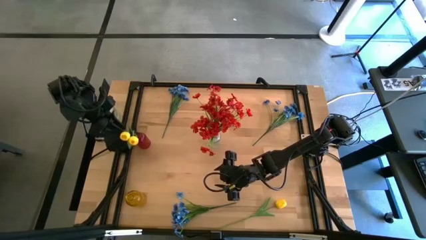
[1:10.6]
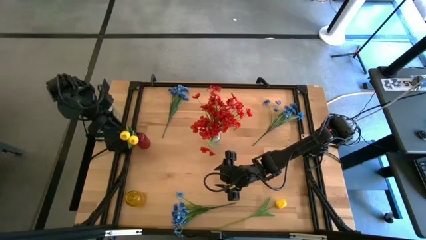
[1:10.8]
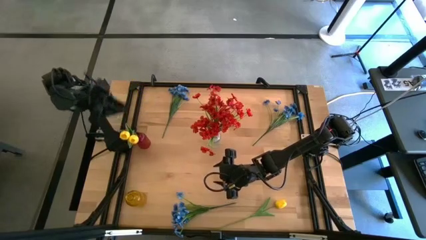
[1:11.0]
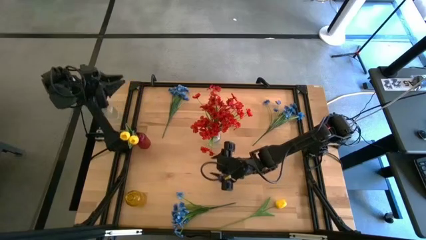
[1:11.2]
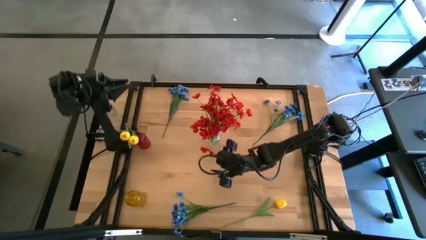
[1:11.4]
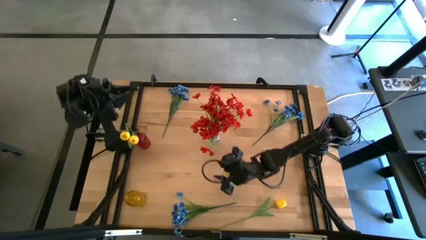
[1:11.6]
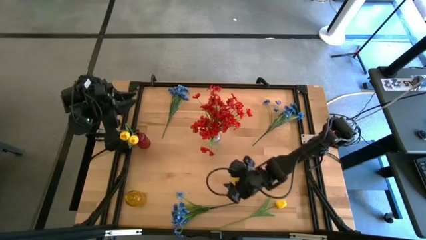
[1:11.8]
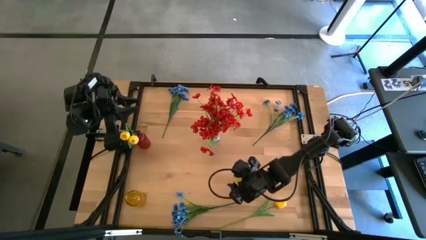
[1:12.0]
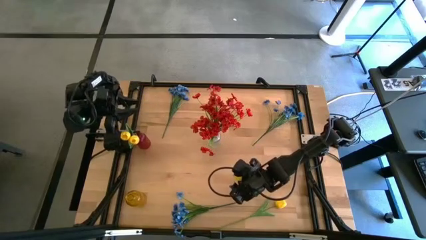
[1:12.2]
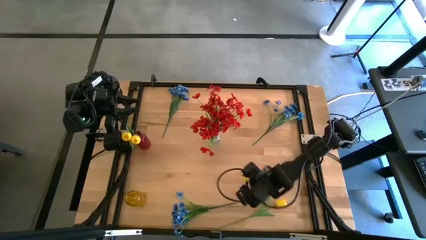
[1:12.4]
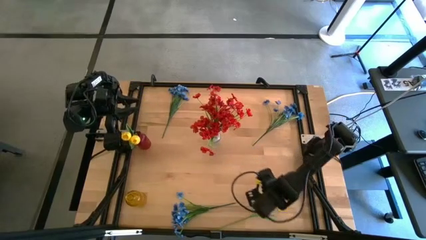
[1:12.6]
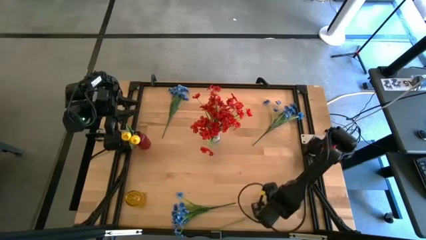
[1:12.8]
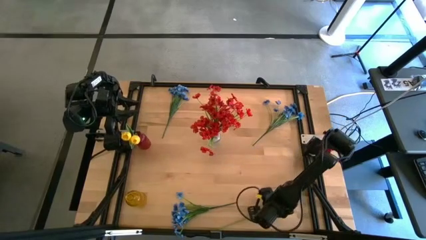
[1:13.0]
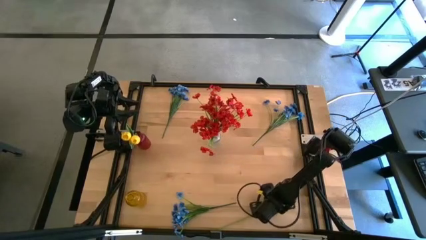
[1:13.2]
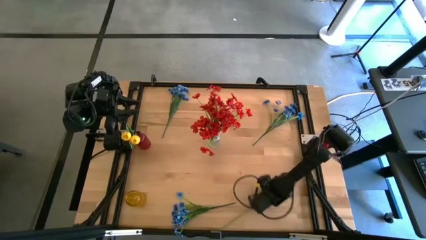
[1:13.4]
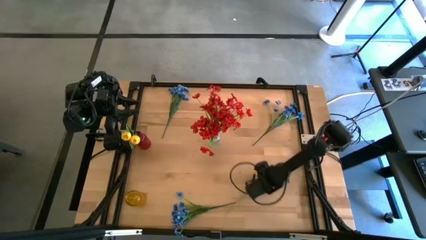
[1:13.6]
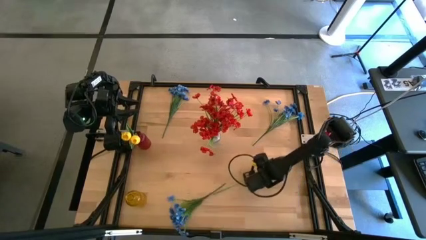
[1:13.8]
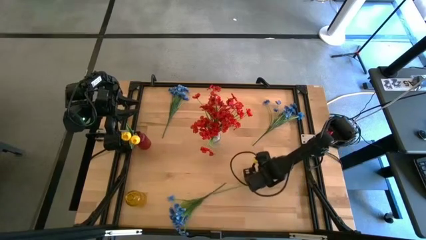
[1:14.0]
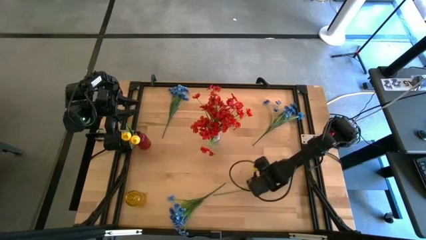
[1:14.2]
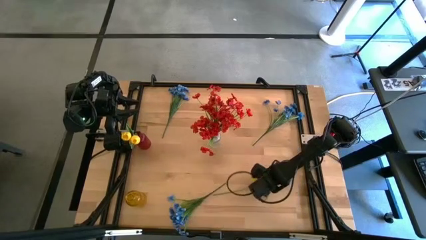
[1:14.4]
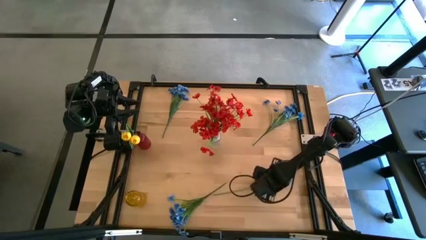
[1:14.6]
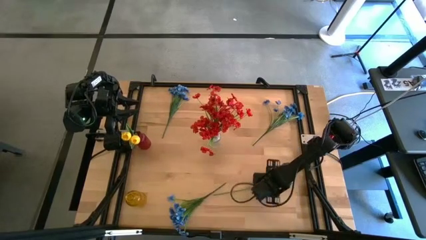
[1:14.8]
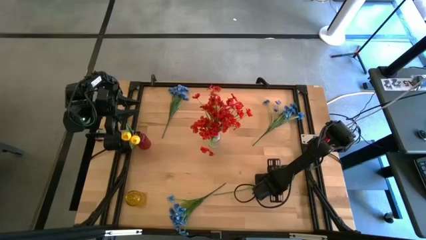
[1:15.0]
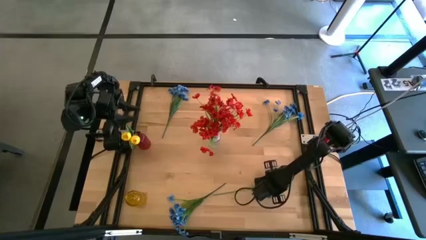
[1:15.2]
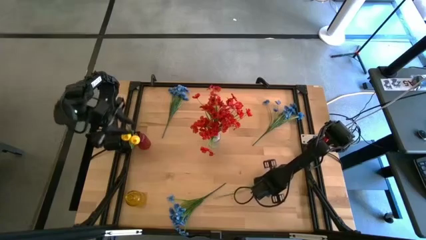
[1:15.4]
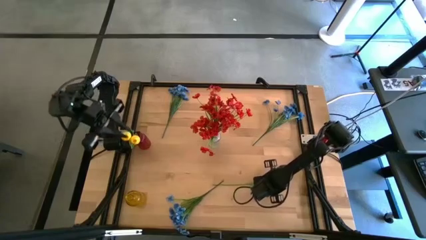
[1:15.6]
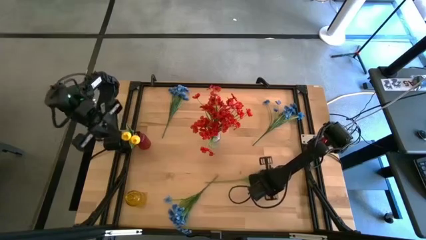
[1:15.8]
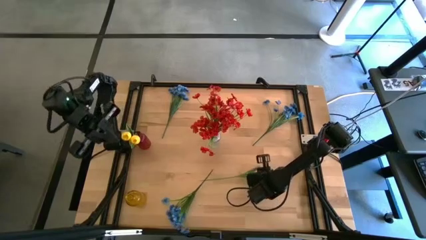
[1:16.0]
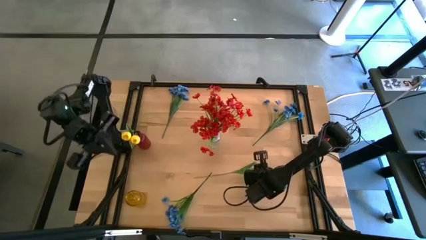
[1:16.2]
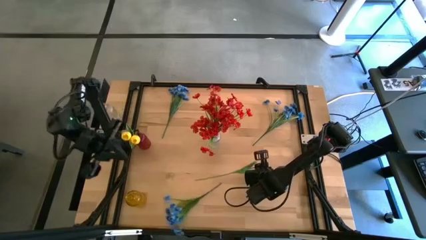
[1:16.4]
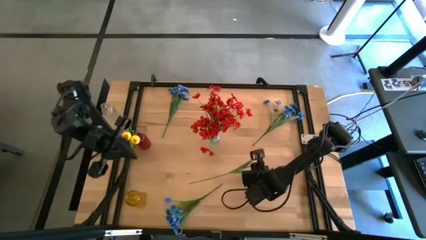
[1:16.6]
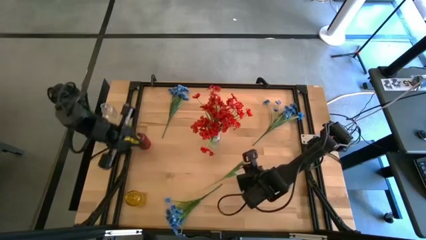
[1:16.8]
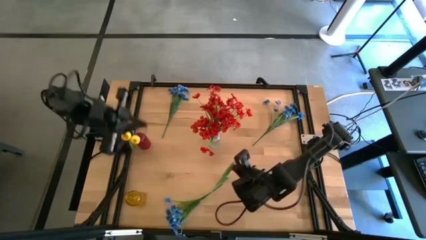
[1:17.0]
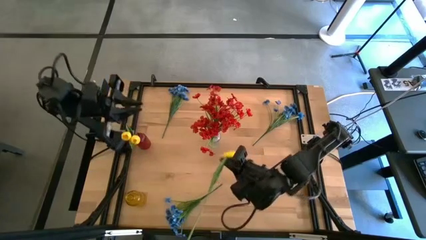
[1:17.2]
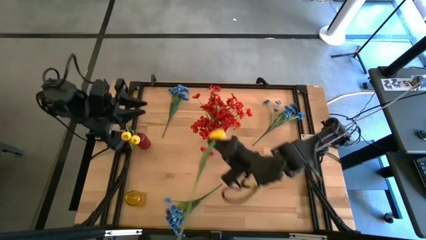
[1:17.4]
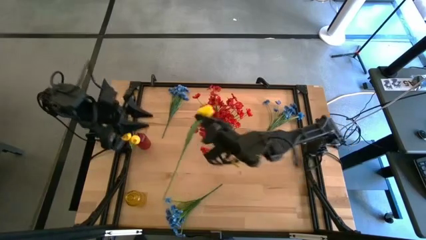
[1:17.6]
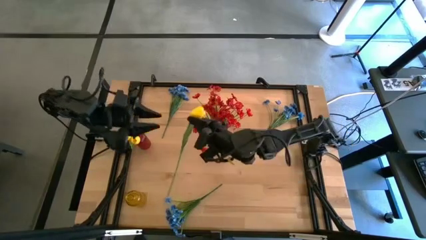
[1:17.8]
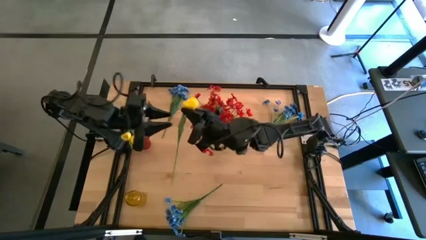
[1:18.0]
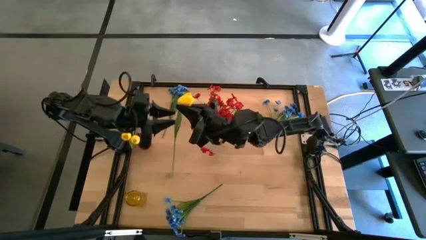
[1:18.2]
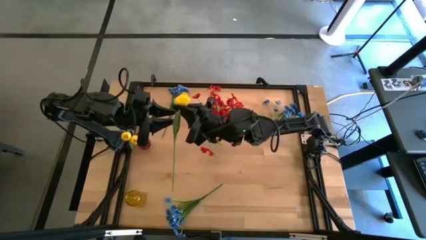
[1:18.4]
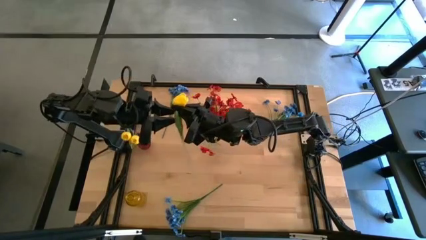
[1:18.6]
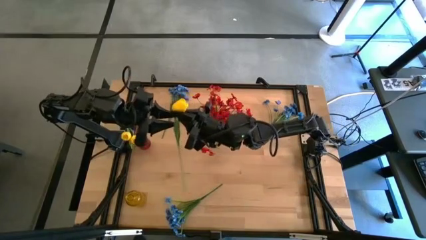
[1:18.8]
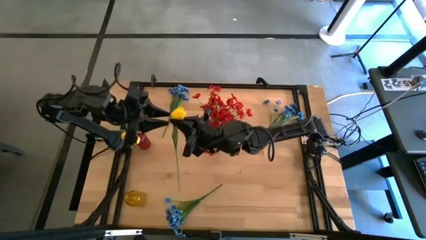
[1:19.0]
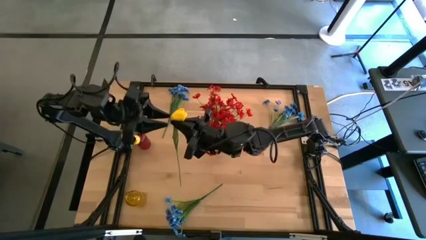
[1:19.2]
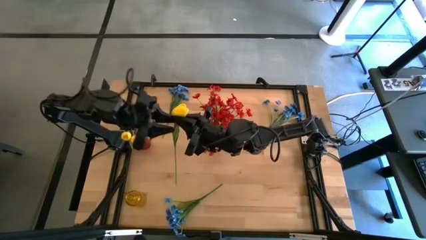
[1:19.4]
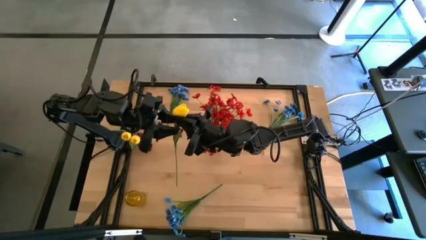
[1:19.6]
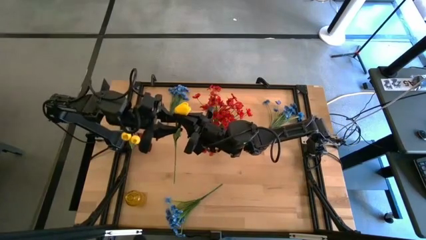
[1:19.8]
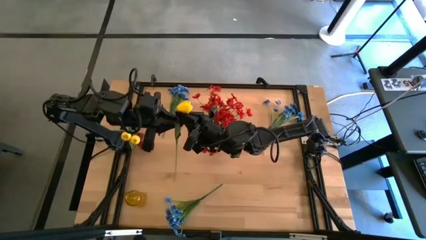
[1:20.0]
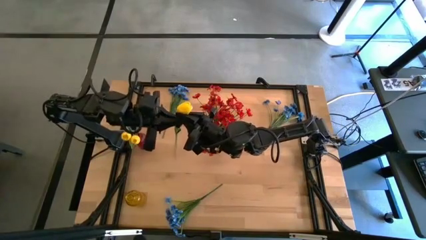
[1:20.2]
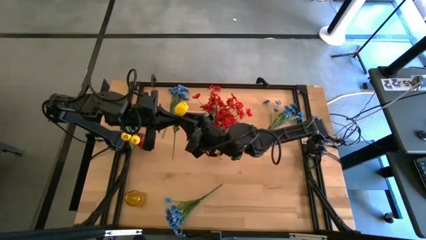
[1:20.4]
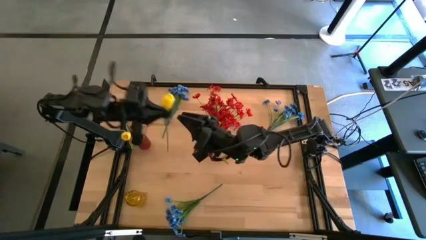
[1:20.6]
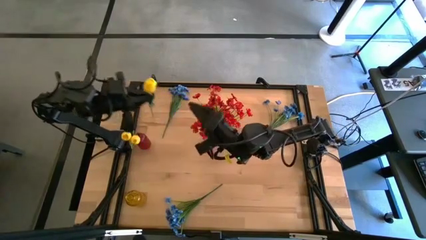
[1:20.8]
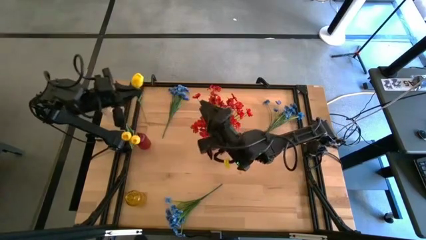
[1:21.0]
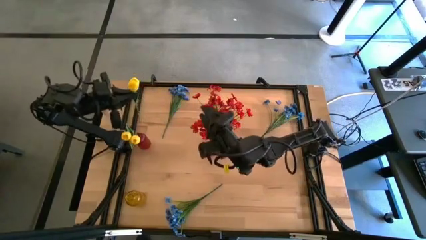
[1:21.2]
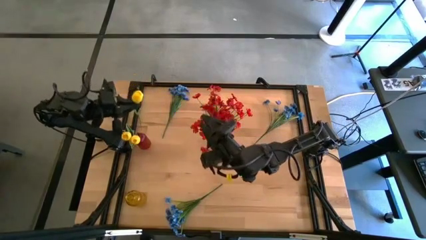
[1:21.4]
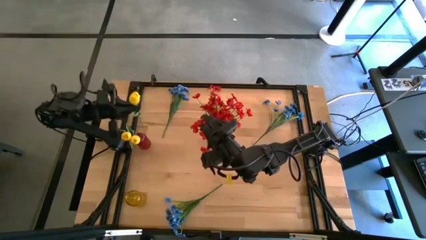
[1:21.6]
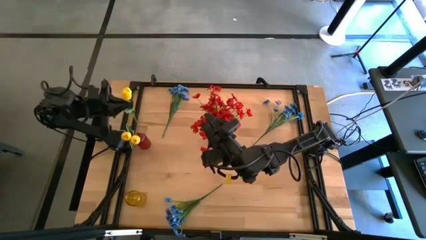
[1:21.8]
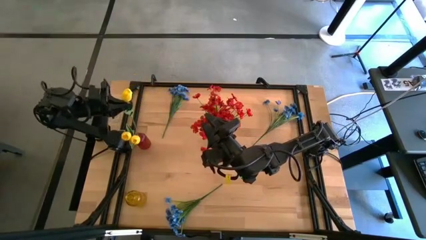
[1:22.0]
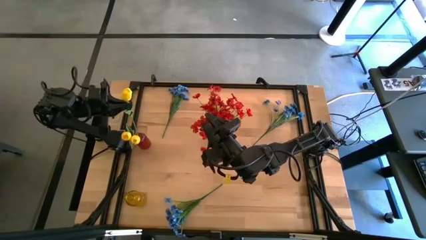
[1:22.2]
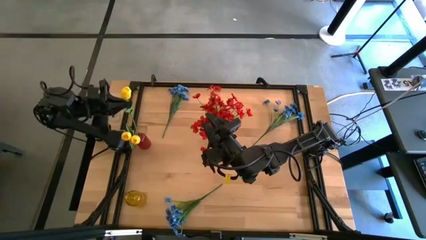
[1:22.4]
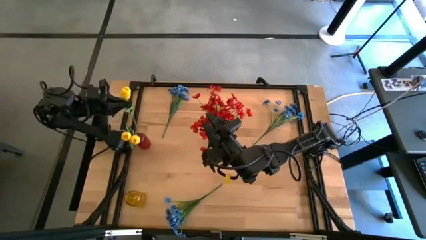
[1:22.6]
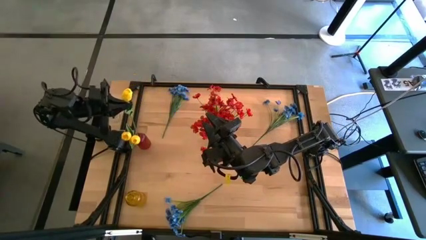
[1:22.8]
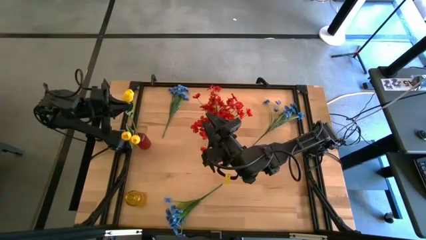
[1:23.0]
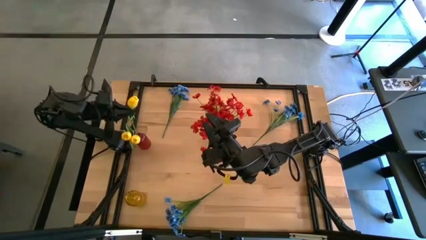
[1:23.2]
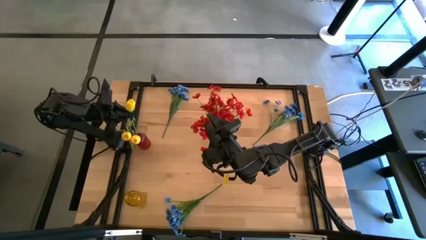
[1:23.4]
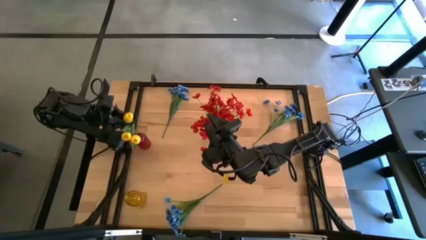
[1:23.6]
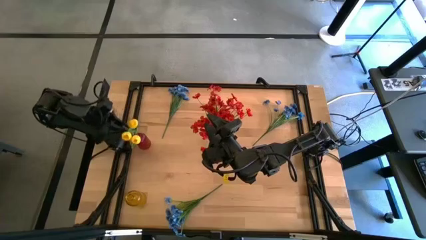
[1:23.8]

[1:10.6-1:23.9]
Task: Sort flowers into vase by color
Put the yellow flower into the red vase
